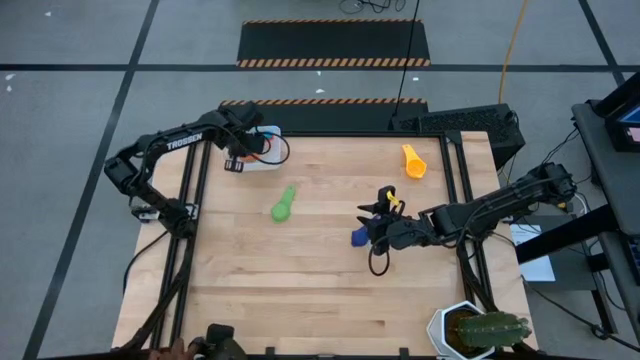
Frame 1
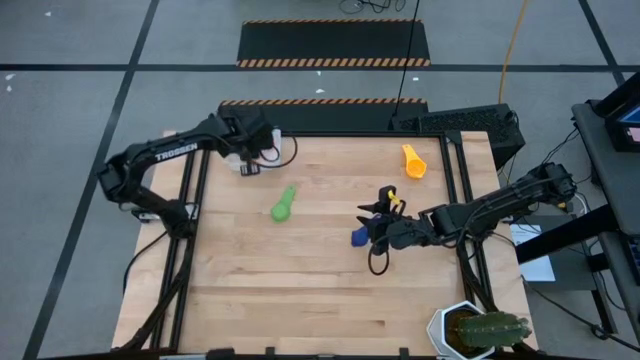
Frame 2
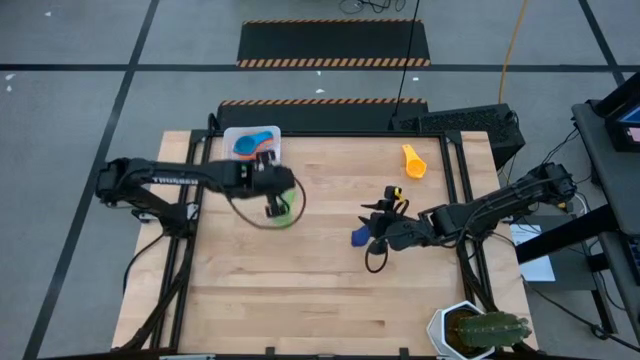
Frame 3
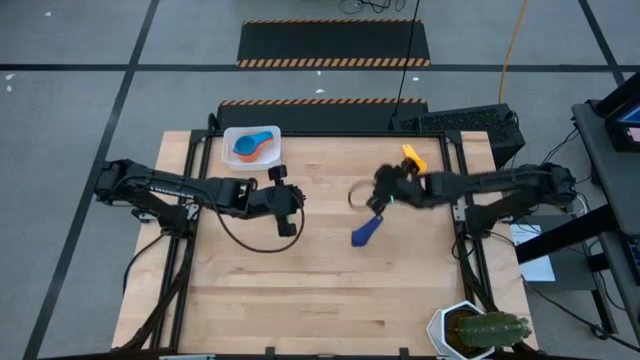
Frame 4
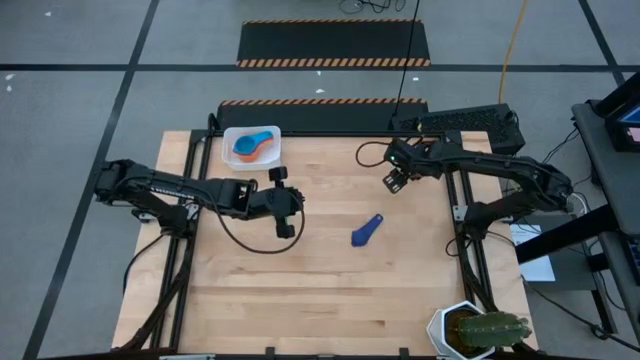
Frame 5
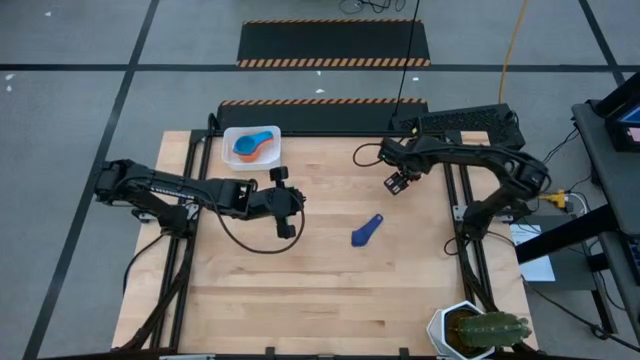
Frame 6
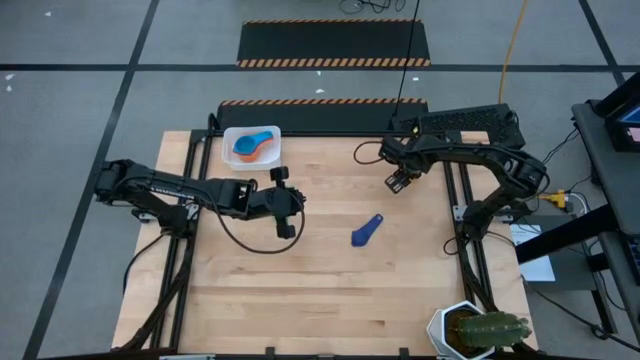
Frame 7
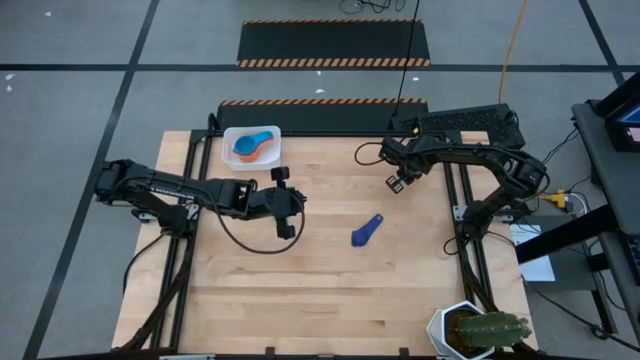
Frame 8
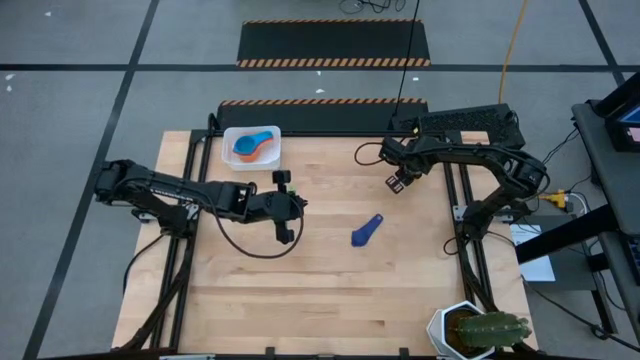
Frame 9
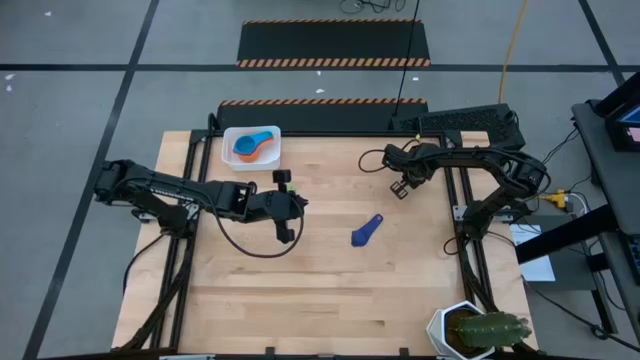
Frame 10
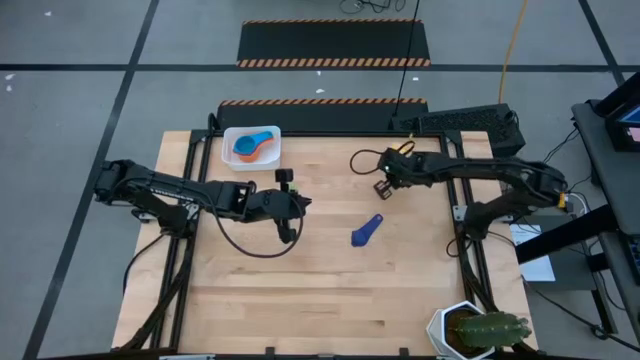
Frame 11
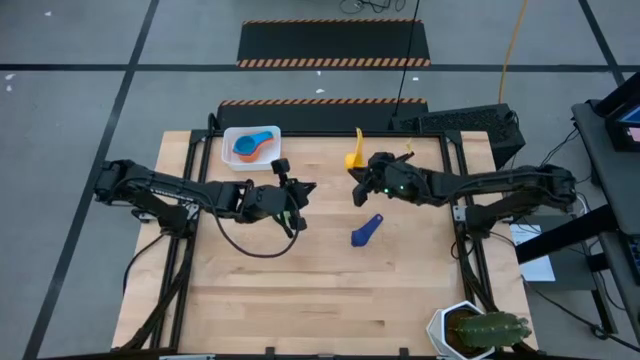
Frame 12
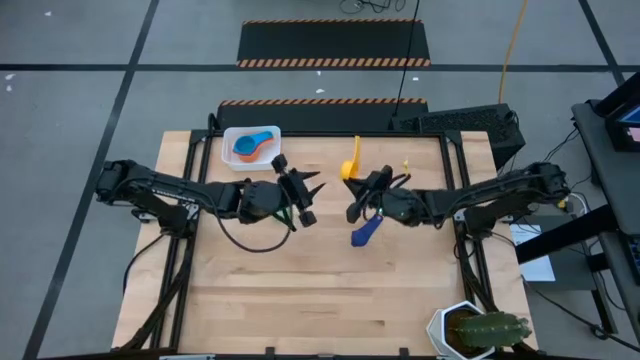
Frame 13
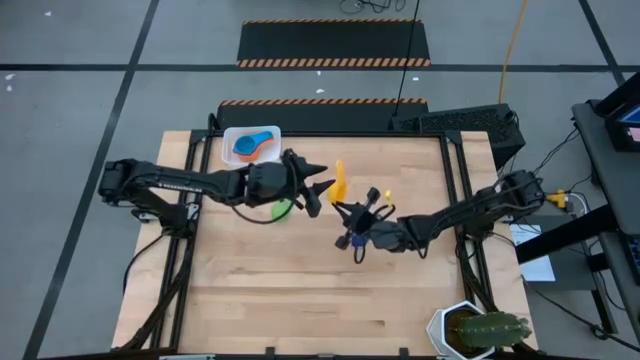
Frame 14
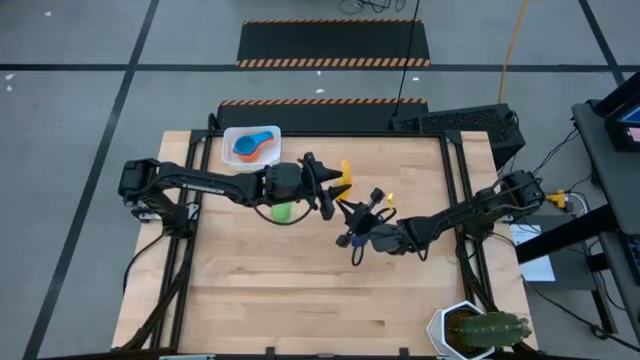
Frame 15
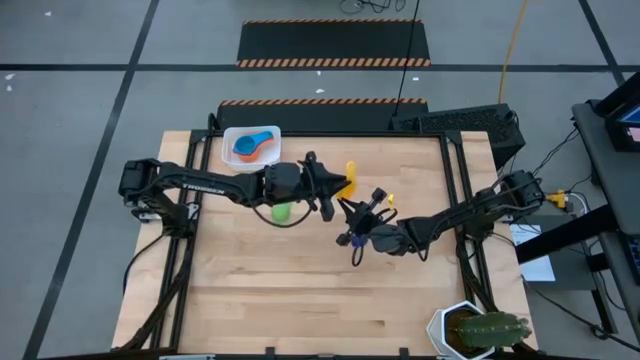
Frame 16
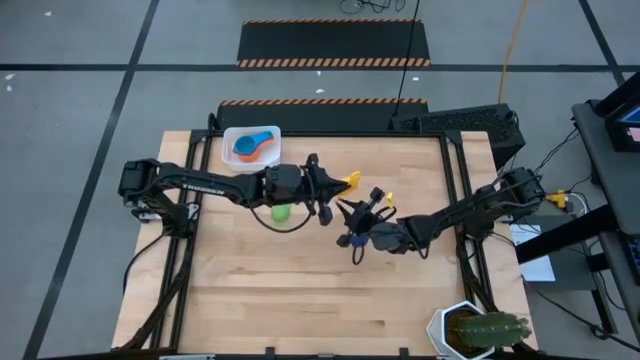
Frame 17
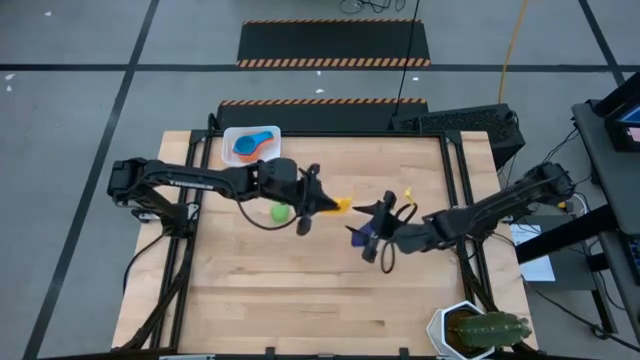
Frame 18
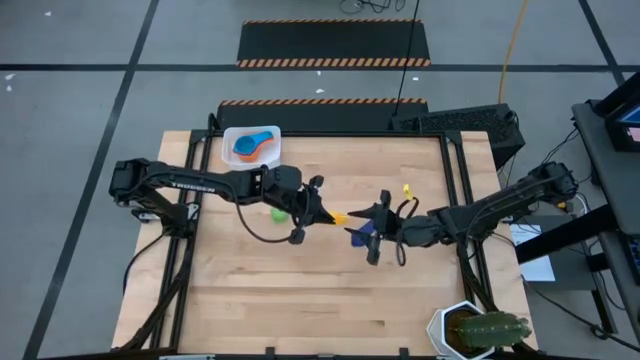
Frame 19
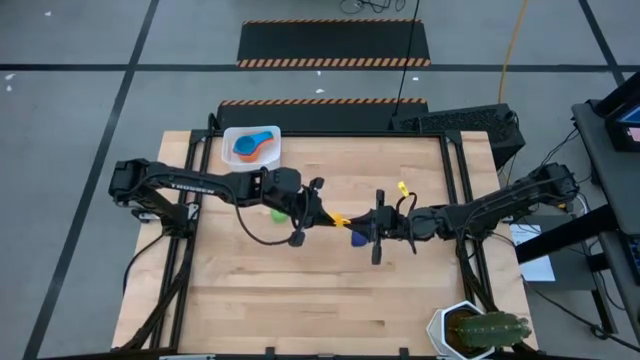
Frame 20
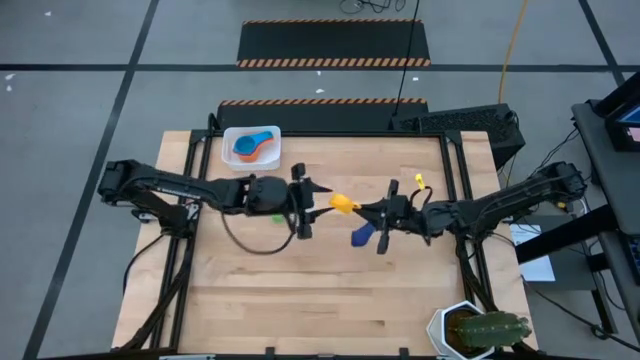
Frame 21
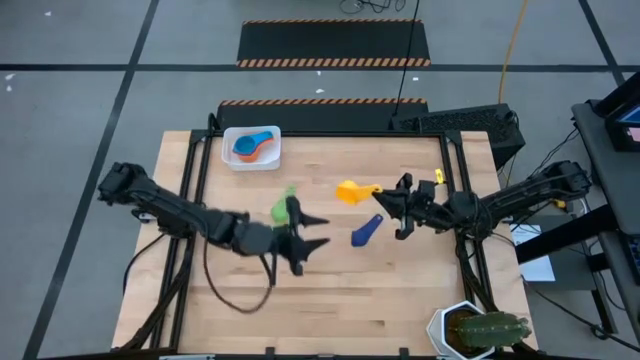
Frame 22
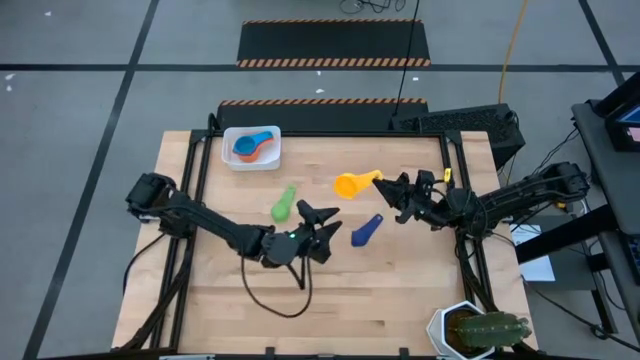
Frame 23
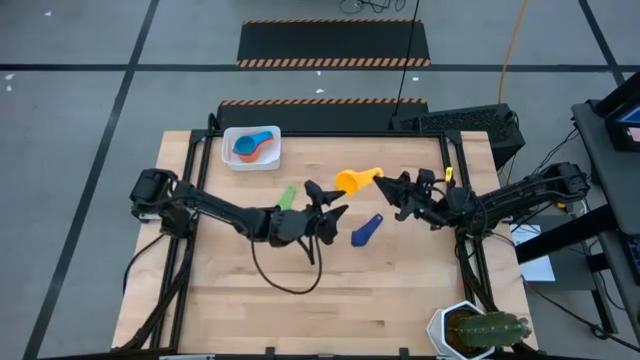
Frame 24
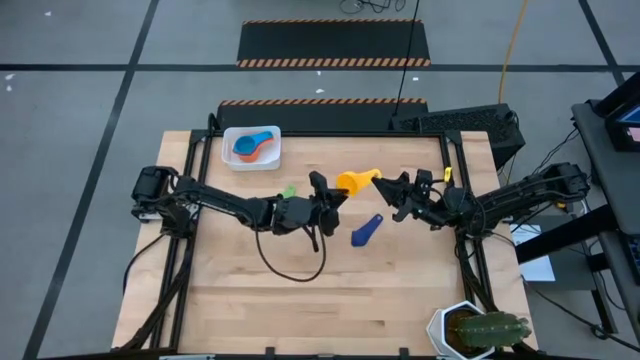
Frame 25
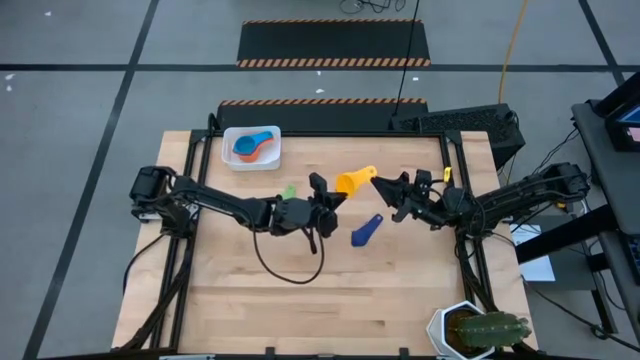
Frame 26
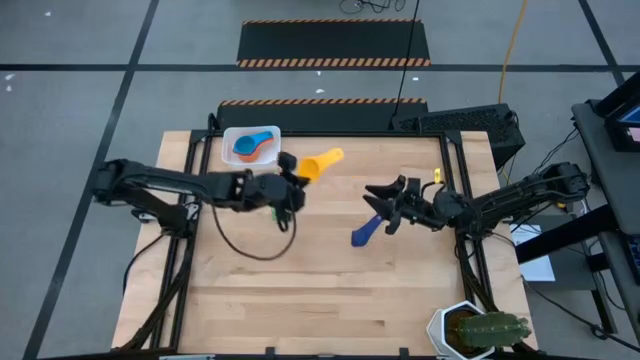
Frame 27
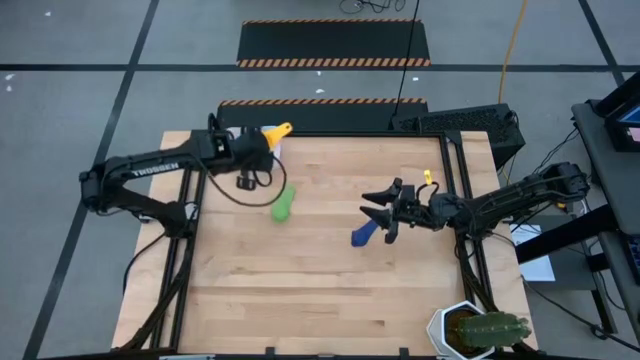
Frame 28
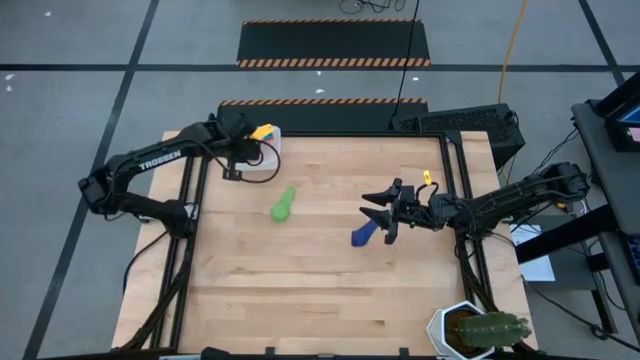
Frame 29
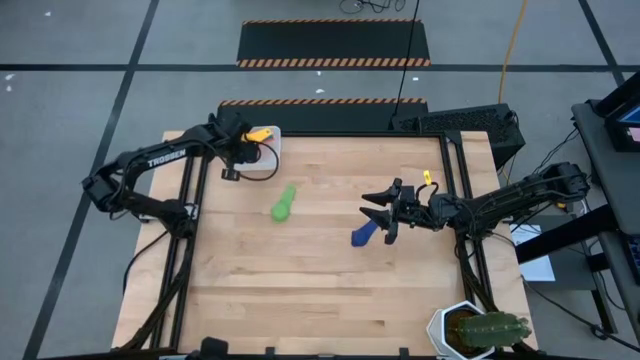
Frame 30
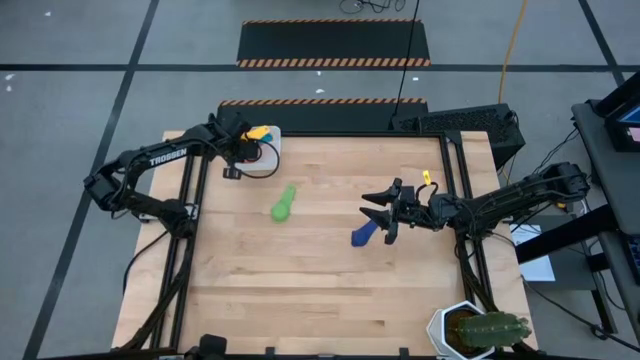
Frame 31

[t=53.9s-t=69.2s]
Task: Nest measuring cups in basket
Stack the yellow measuring cup into the light blue measuring cup

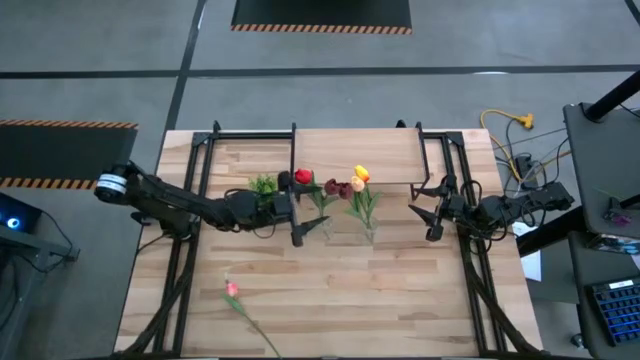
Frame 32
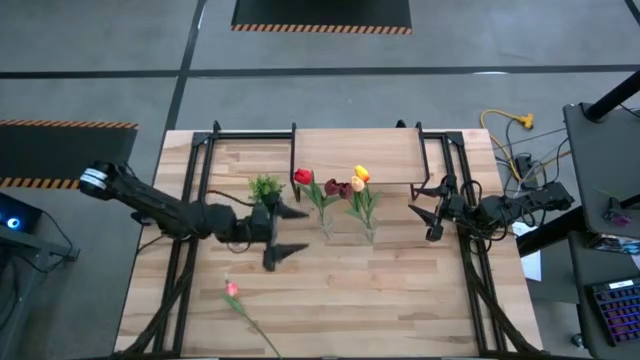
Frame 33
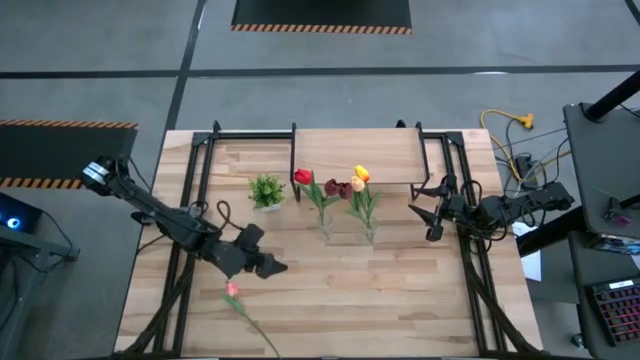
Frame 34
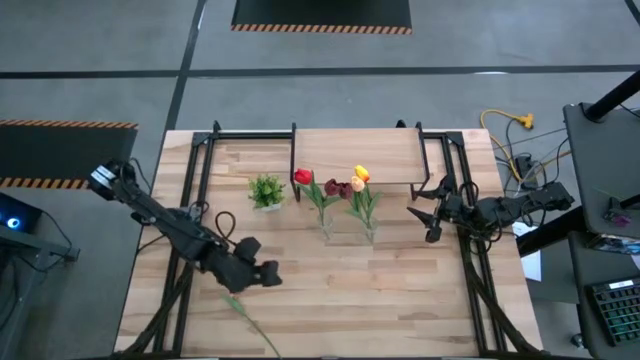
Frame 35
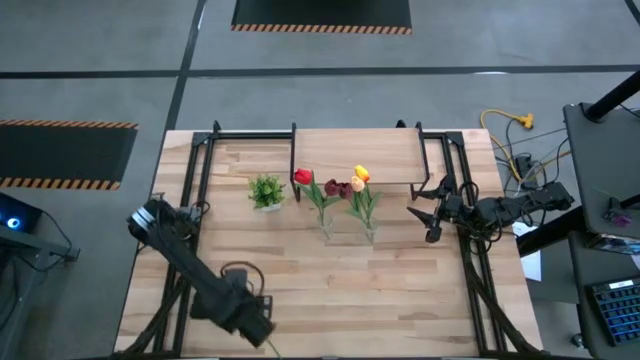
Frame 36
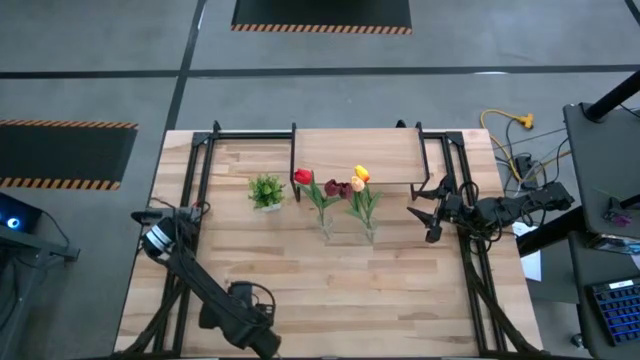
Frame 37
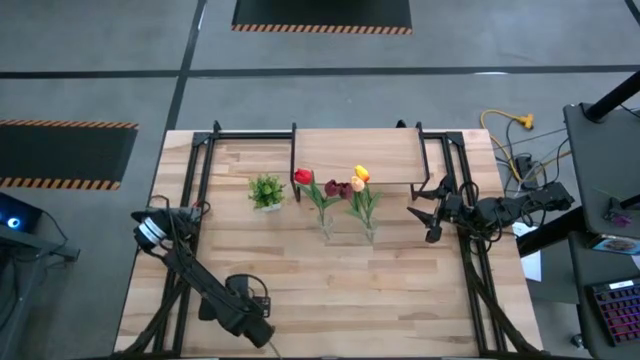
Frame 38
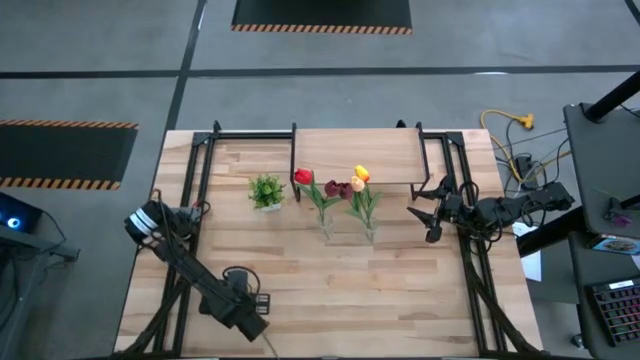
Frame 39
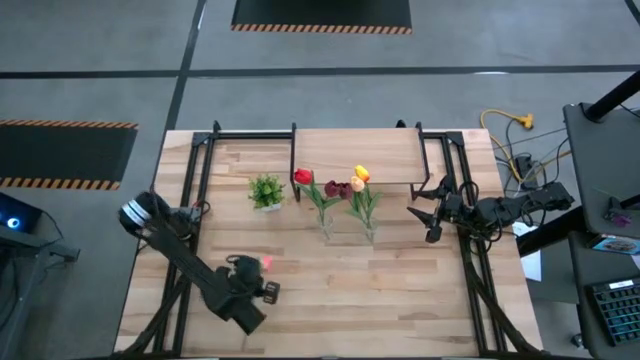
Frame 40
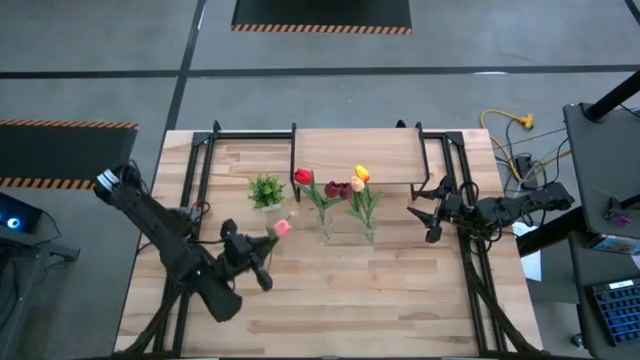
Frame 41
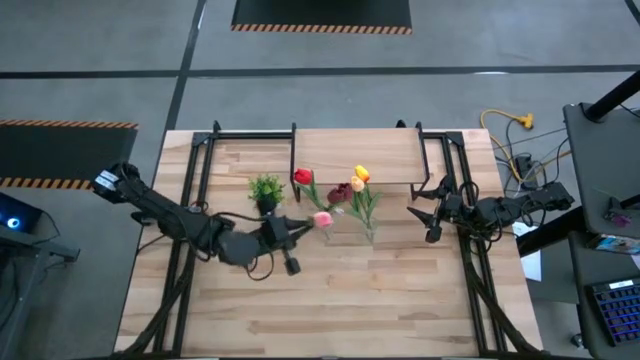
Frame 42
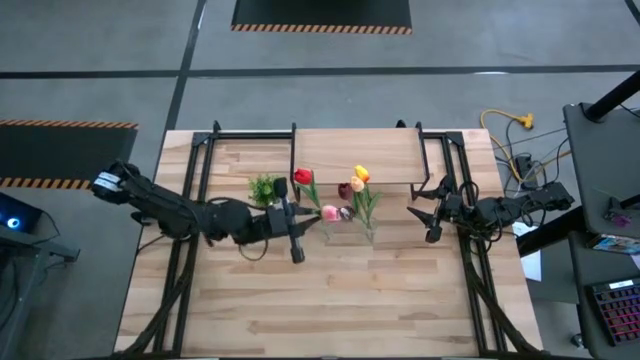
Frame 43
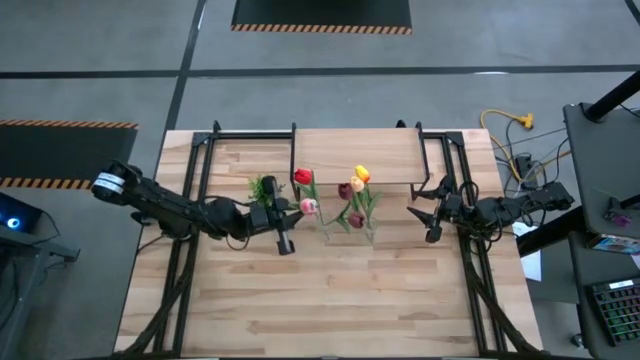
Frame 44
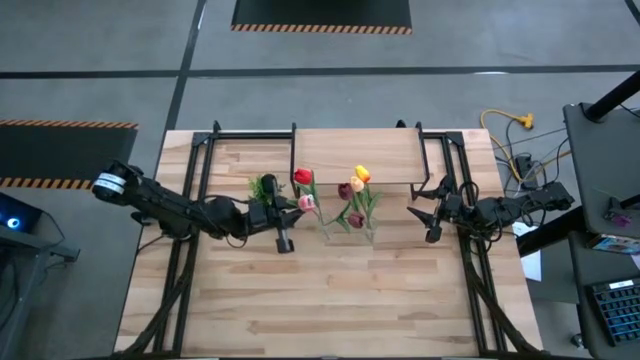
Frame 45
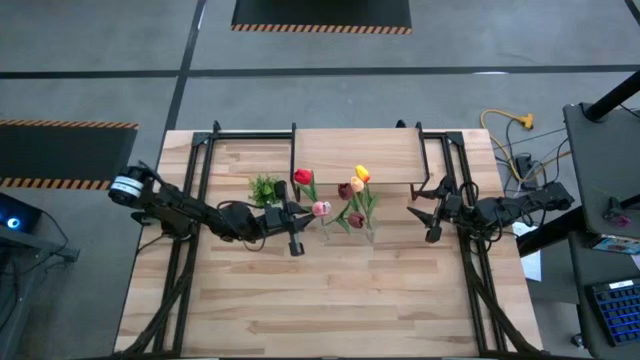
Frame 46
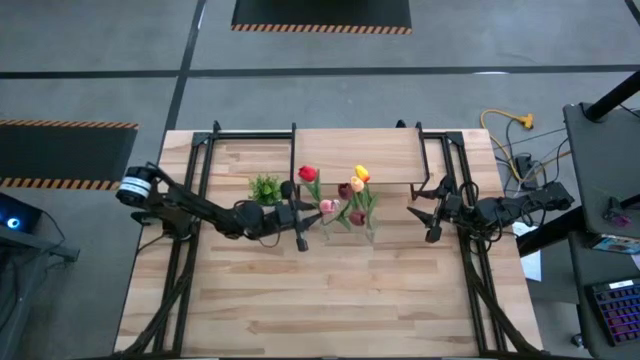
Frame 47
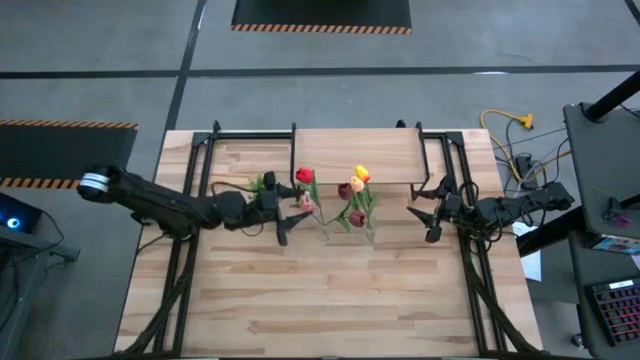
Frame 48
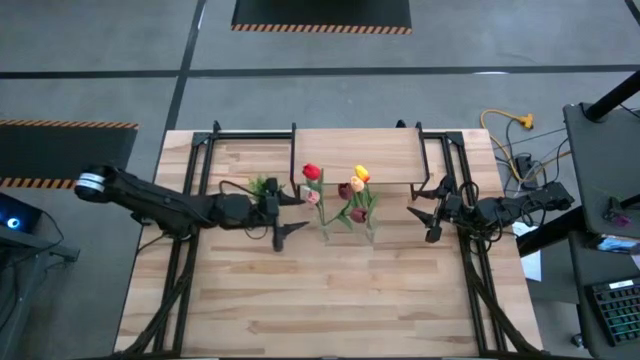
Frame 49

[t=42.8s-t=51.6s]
Task: Pick and place flowers into a vace then onto a shelf
Put the pink tulip into the left transparent vase
